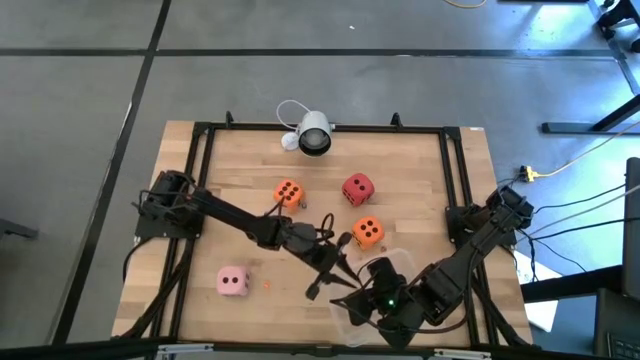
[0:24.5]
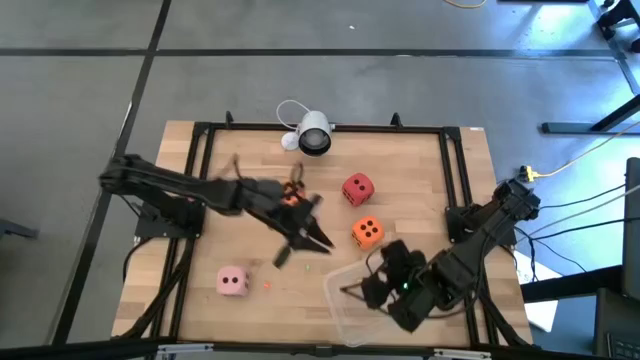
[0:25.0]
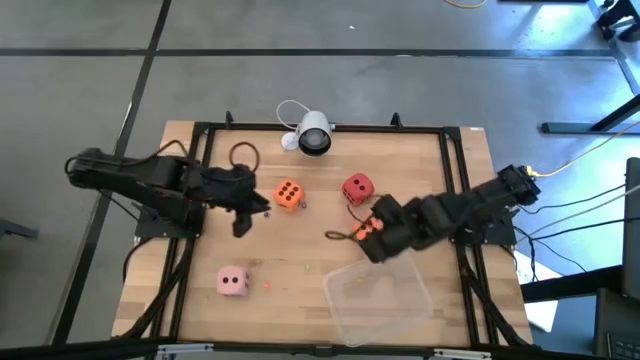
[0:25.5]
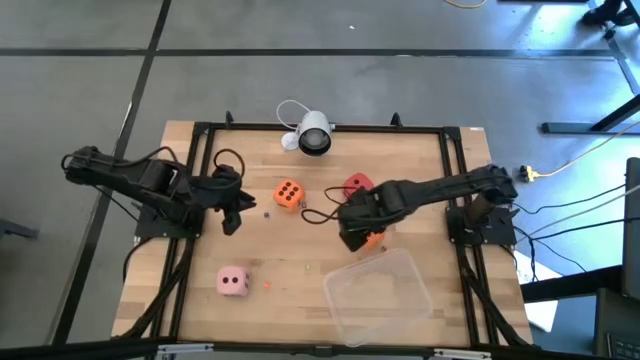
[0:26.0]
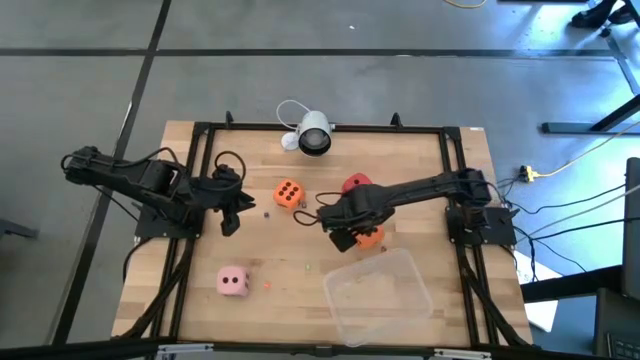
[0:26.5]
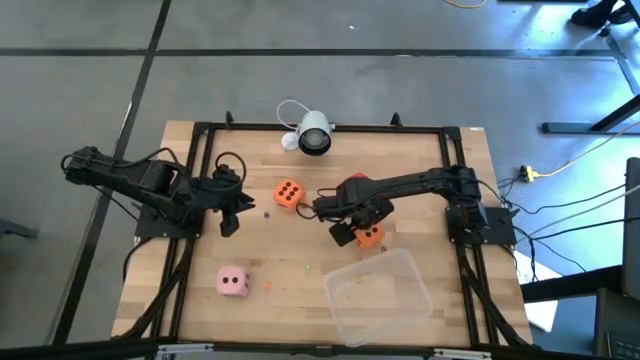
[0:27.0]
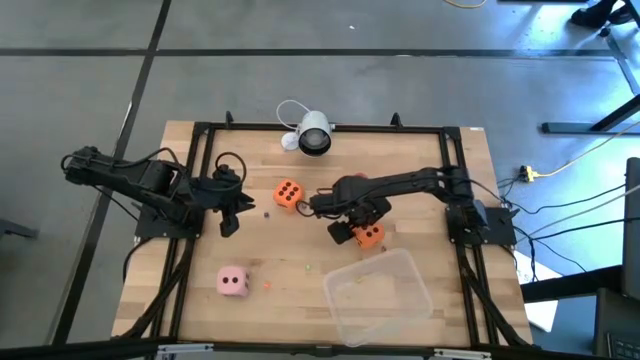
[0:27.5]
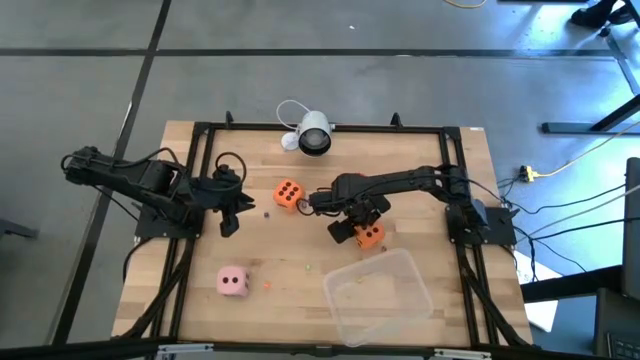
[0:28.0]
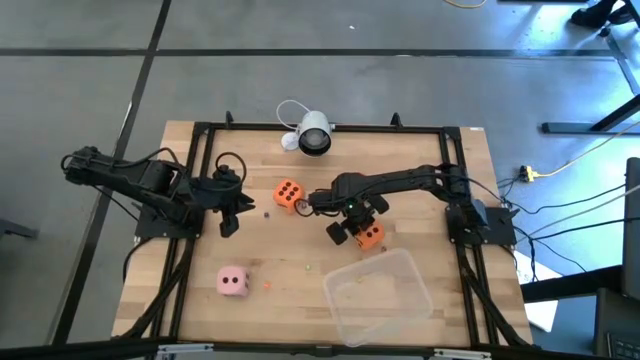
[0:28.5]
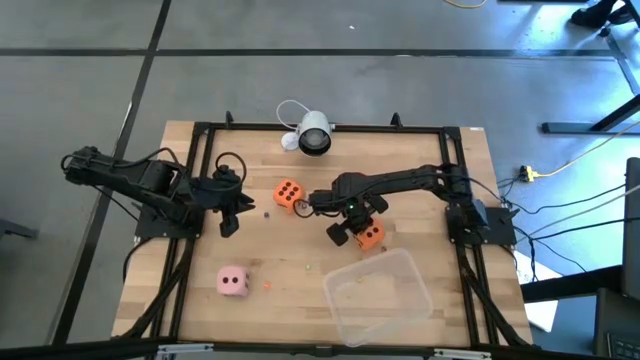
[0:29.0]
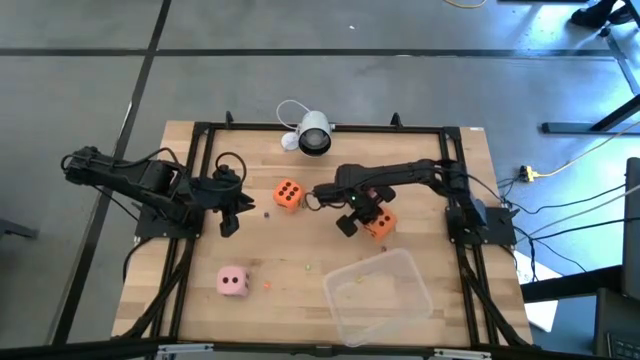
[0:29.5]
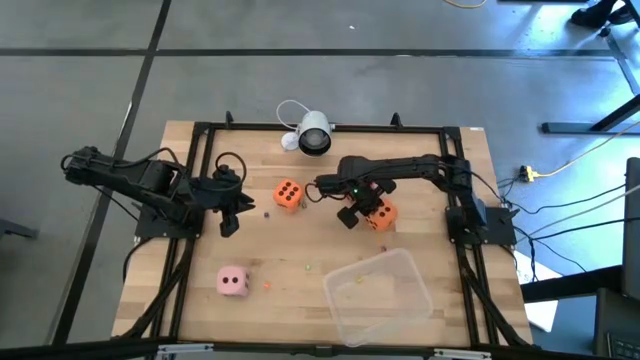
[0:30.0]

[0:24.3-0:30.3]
Task: Pick & Place Dice
Put the right large orange die into the transparent bin

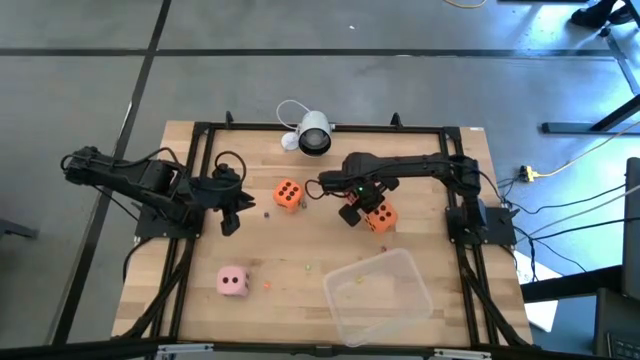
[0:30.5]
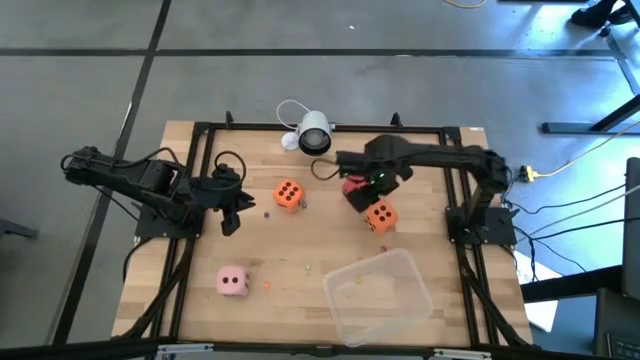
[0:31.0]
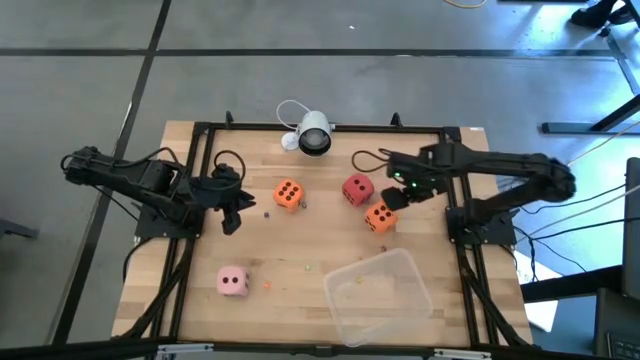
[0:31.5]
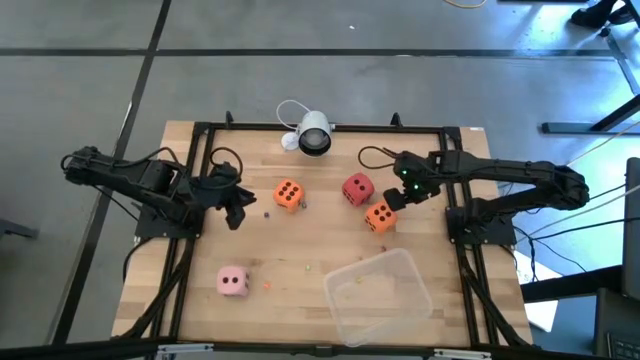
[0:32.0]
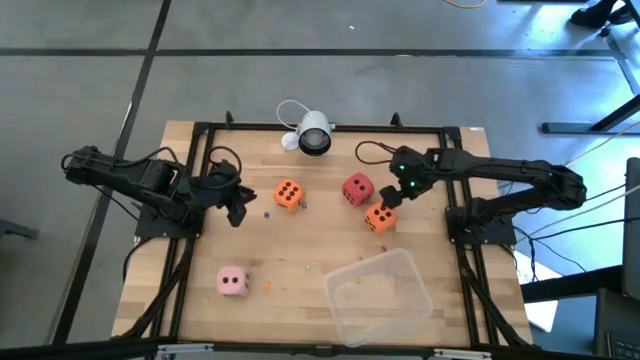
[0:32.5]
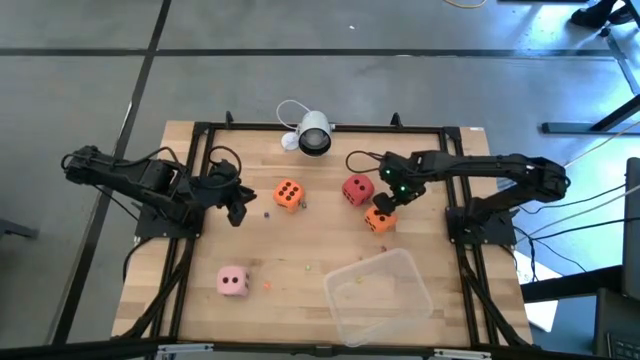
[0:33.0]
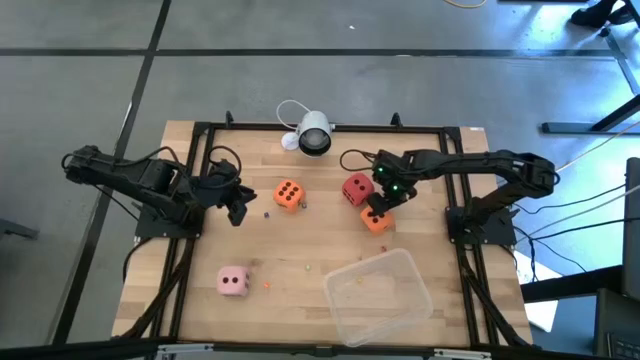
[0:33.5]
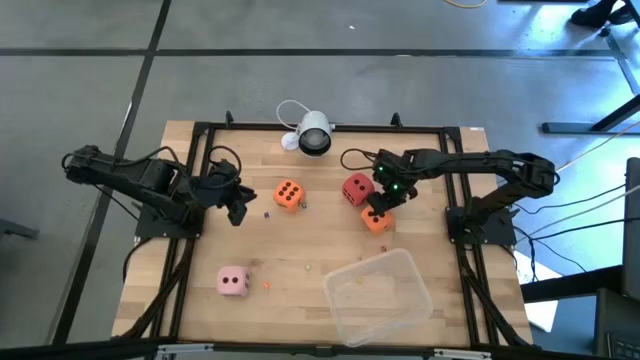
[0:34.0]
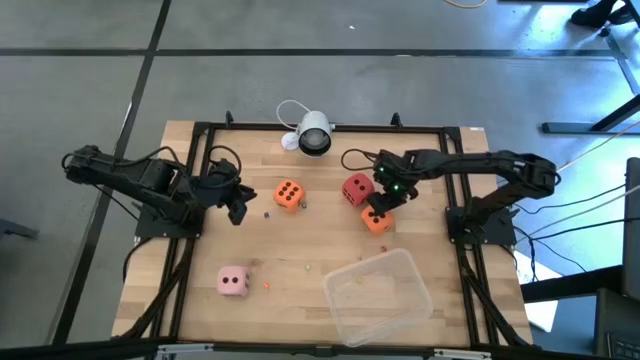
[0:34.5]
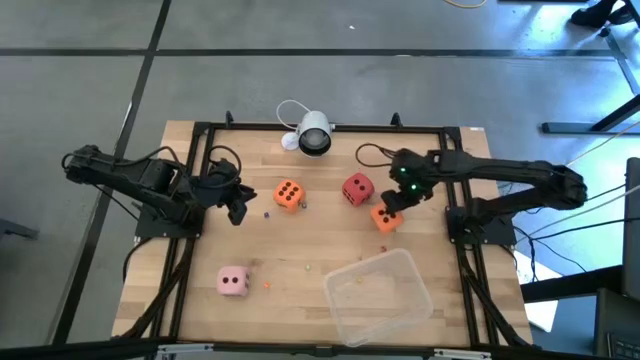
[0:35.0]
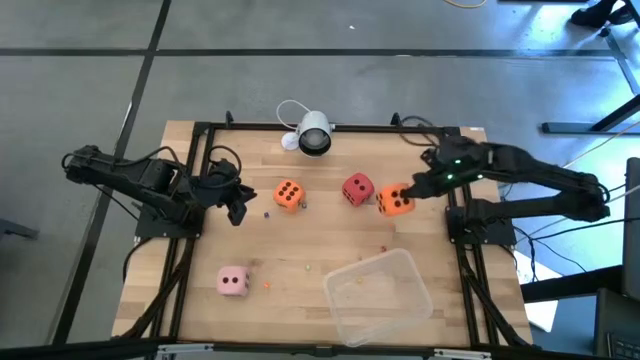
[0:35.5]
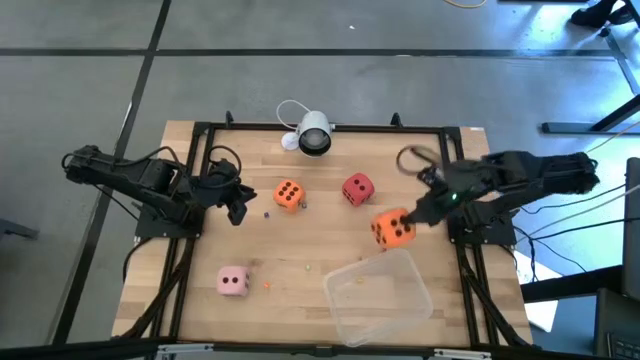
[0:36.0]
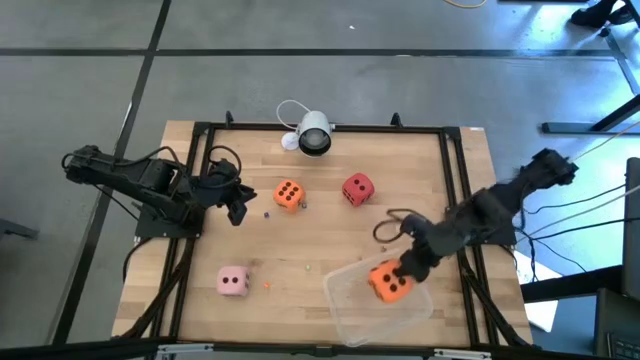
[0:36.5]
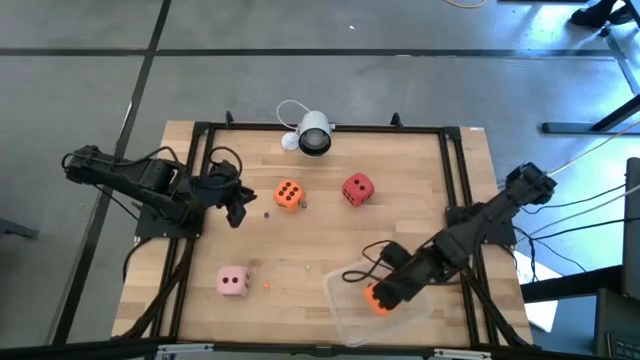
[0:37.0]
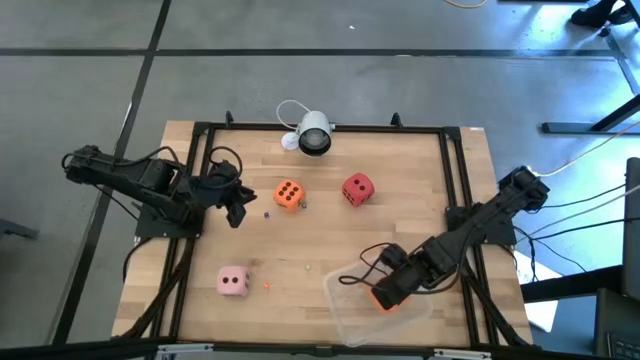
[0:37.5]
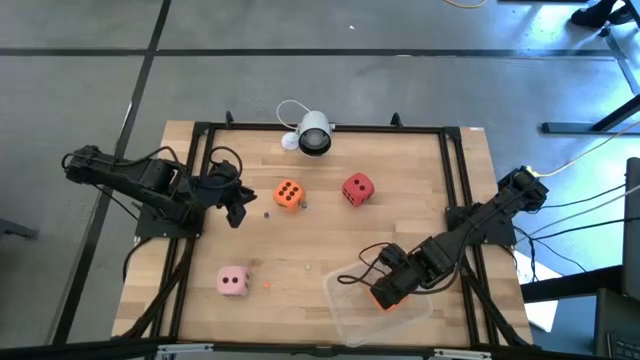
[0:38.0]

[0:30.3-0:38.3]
Put the right large orange die into the transparent bin

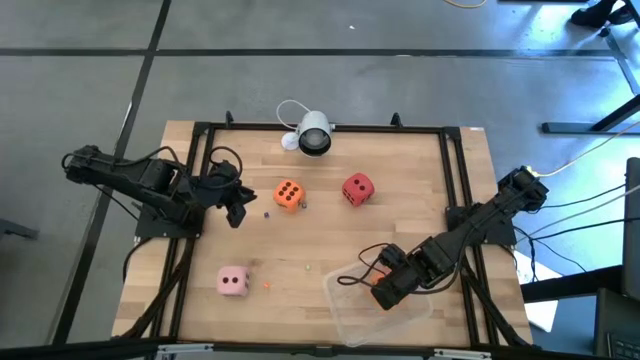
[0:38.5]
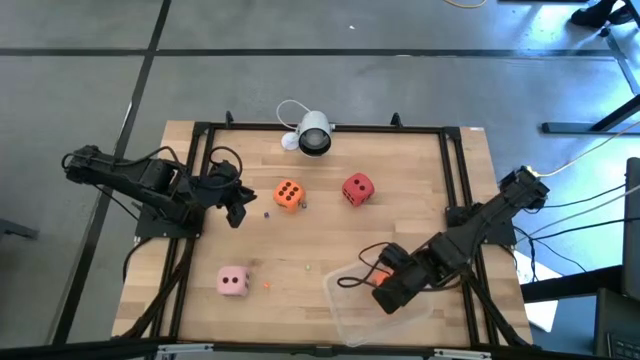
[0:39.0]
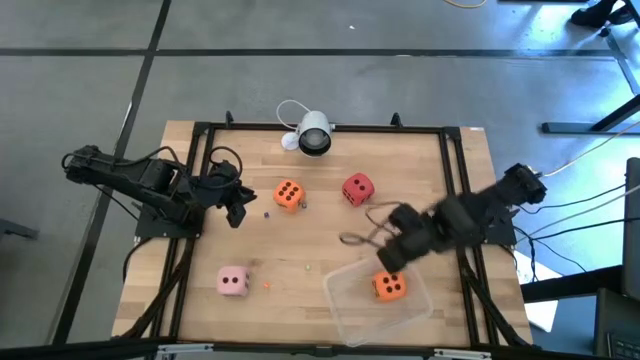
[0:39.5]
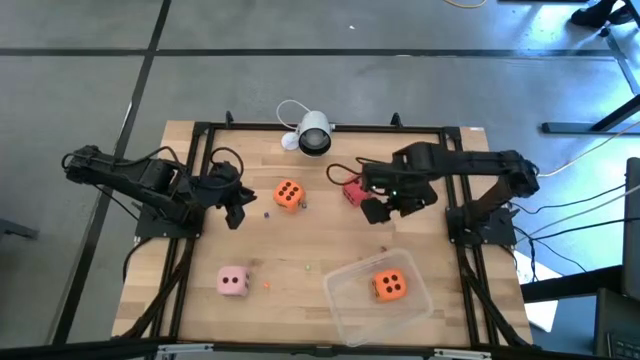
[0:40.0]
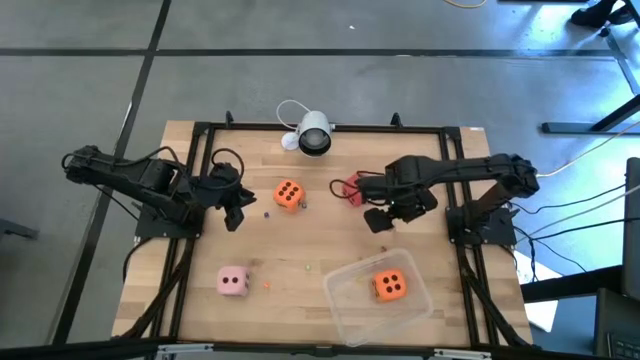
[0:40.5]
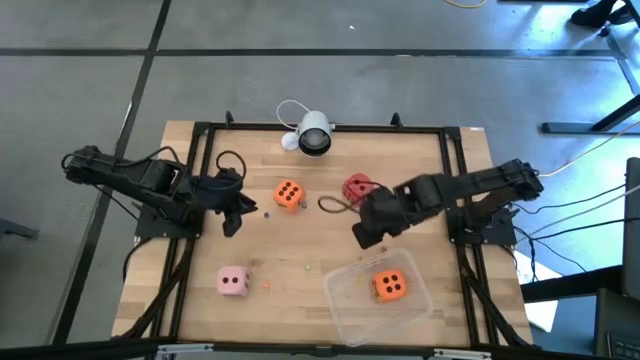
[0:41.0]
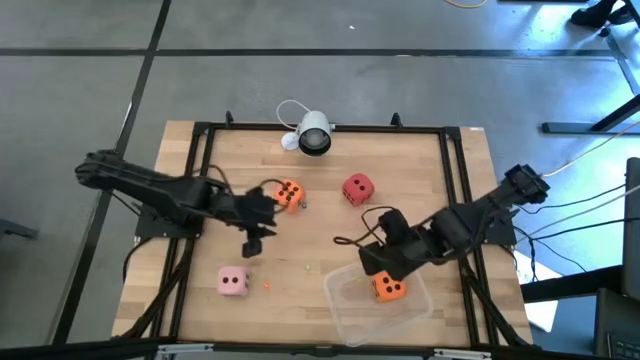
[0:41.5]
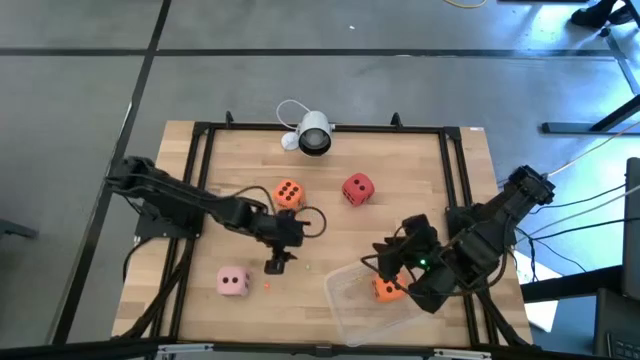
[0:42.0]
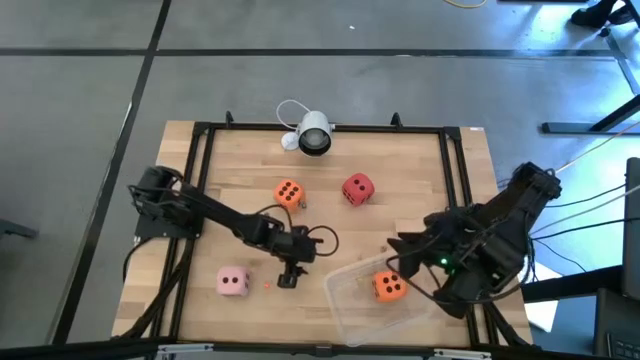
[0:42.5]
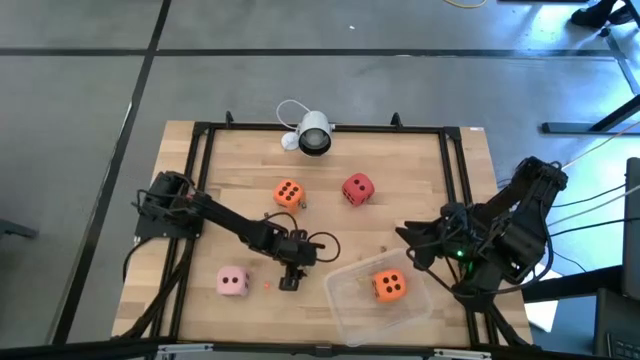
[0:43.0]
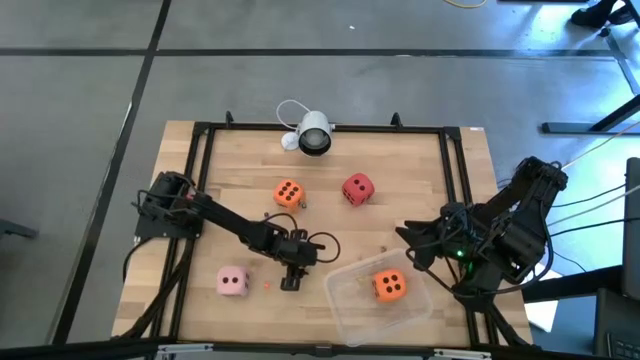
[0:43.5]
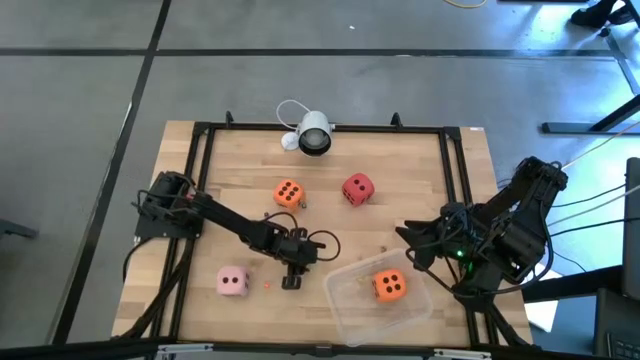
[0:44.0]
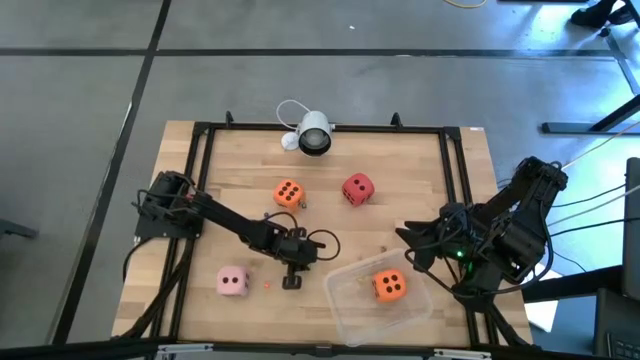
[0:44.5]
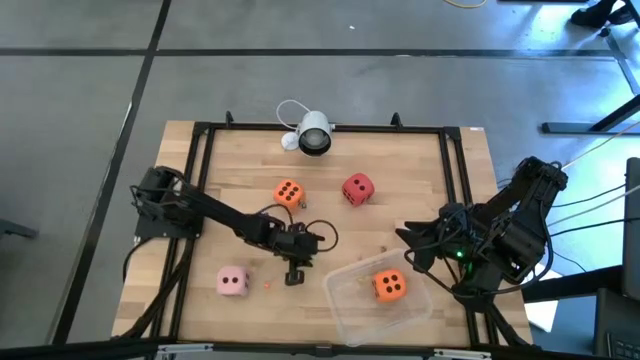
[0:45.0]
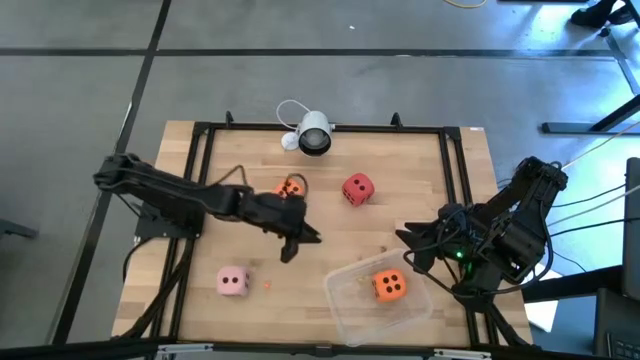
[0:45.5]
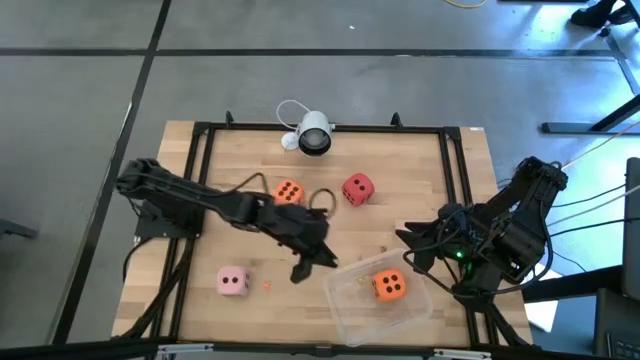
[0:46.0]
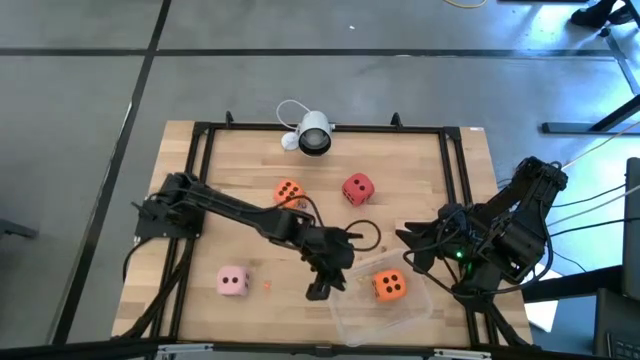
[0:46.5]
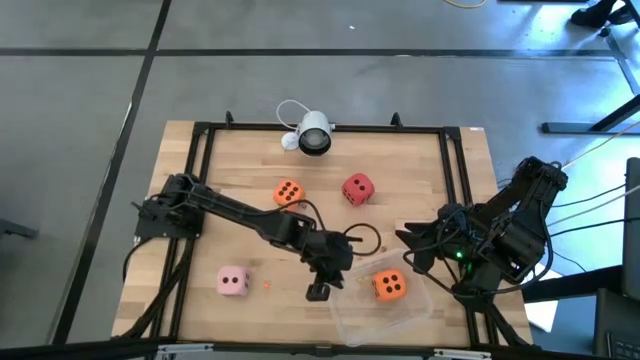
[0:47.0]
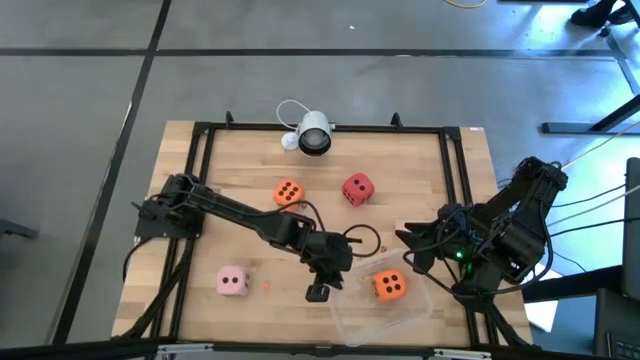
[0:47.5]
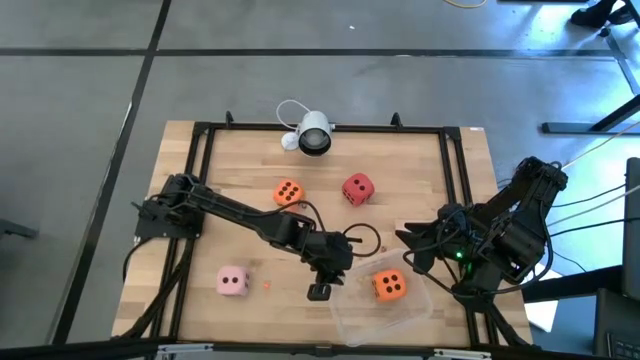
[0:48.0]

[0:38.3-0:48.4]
Put the small green die into the transparent bin
